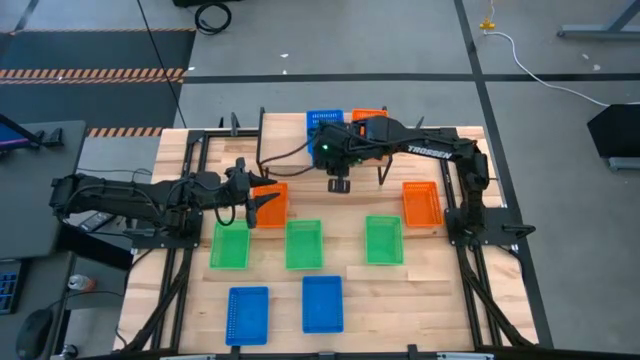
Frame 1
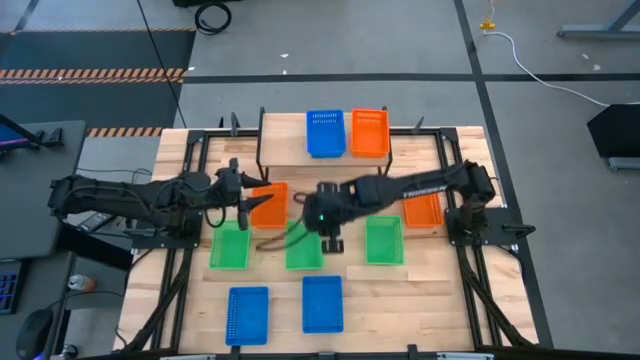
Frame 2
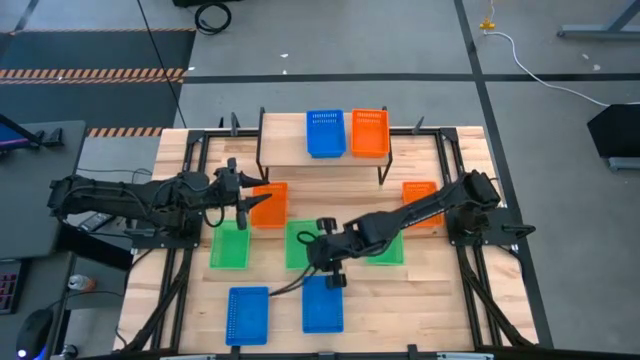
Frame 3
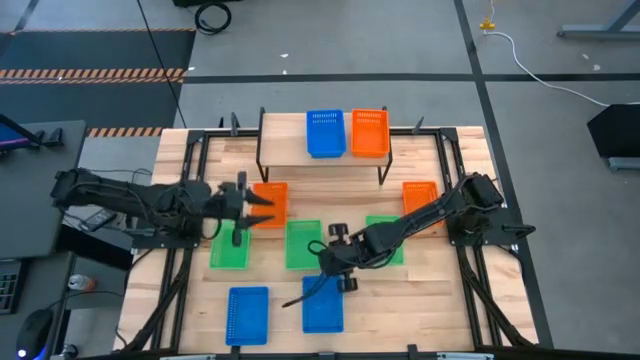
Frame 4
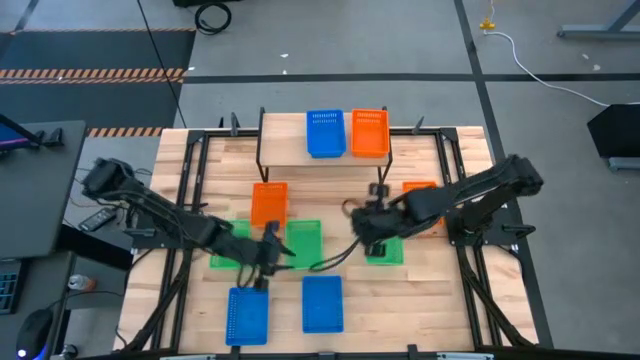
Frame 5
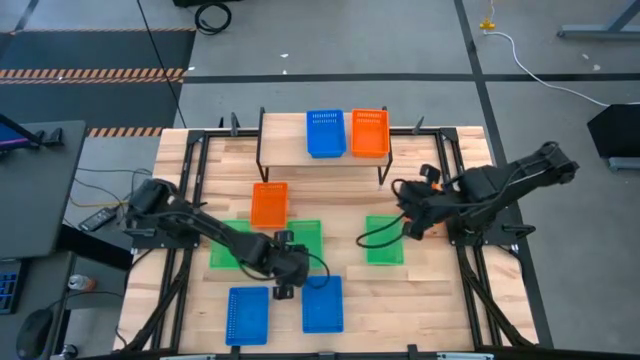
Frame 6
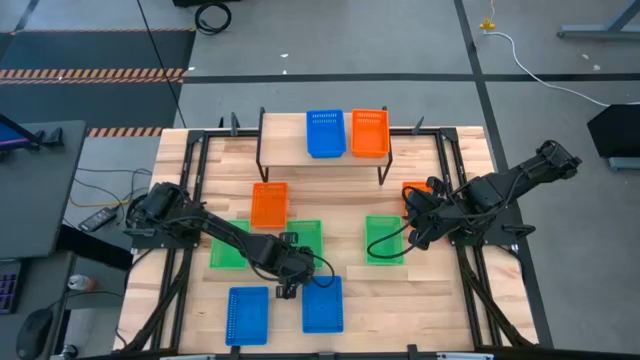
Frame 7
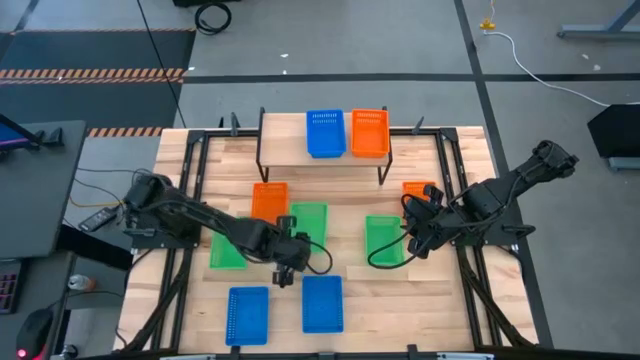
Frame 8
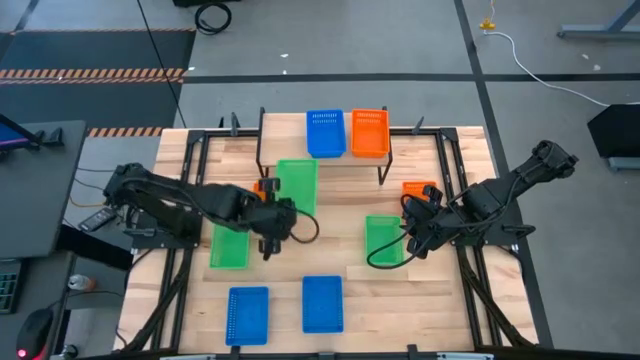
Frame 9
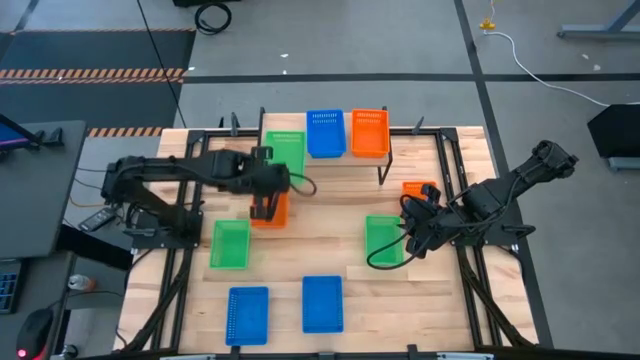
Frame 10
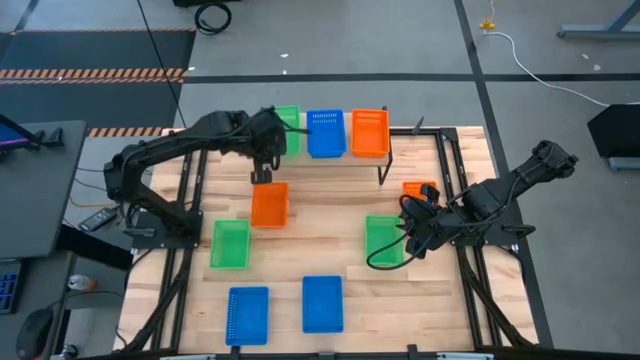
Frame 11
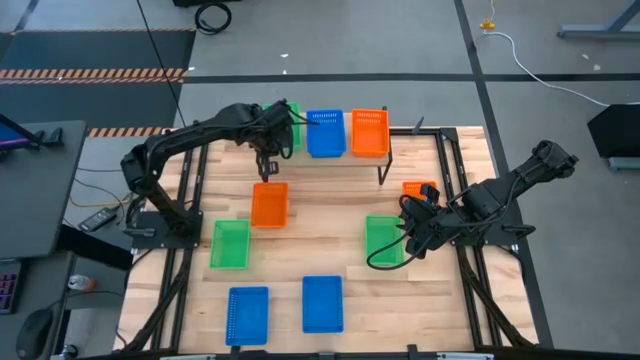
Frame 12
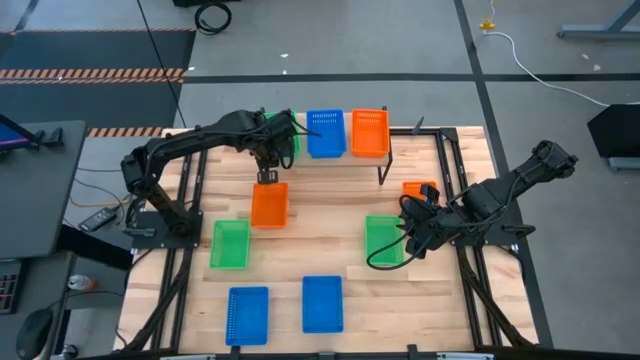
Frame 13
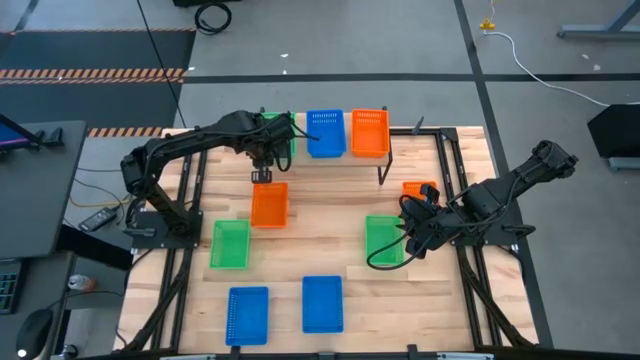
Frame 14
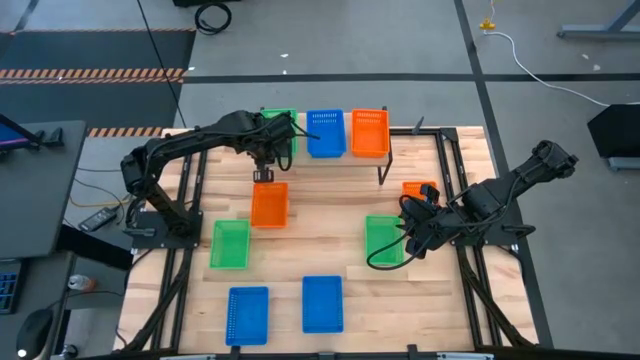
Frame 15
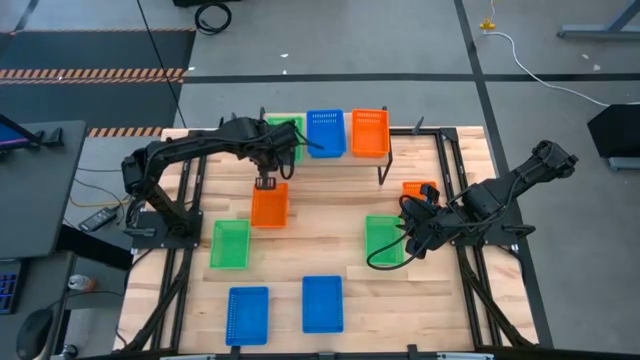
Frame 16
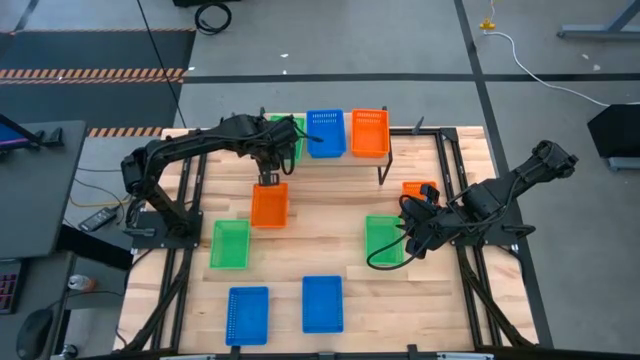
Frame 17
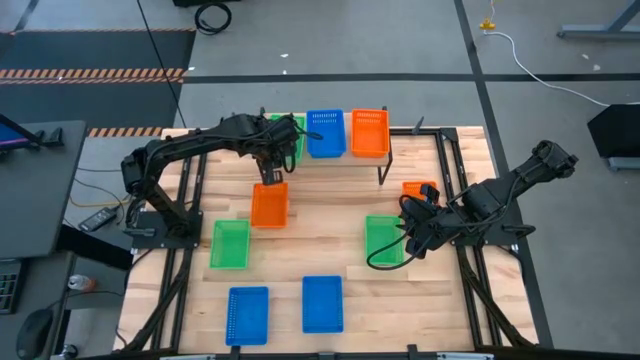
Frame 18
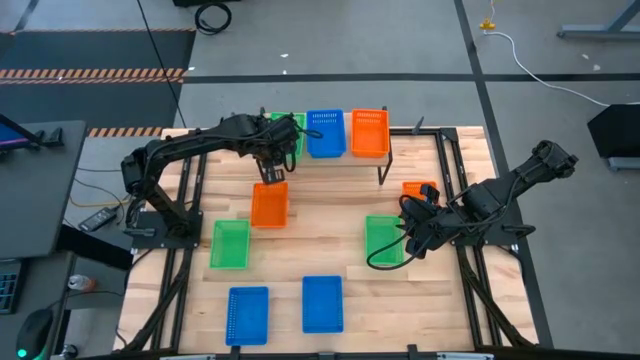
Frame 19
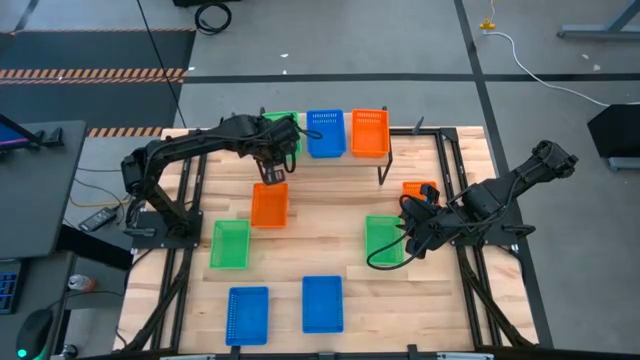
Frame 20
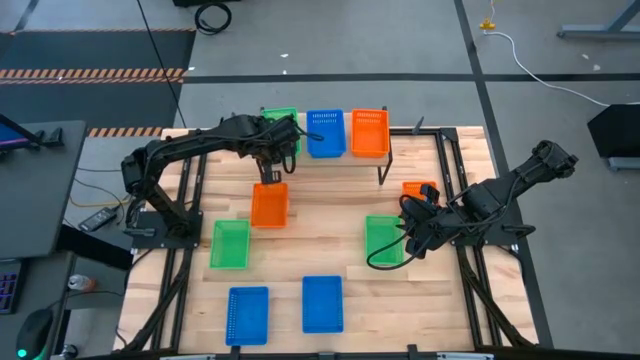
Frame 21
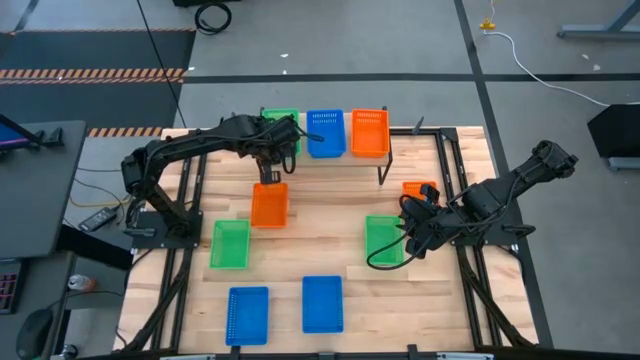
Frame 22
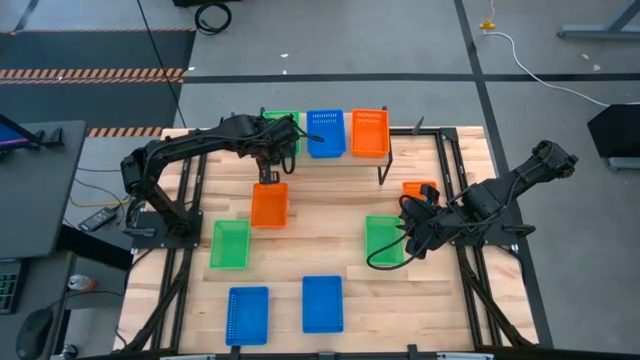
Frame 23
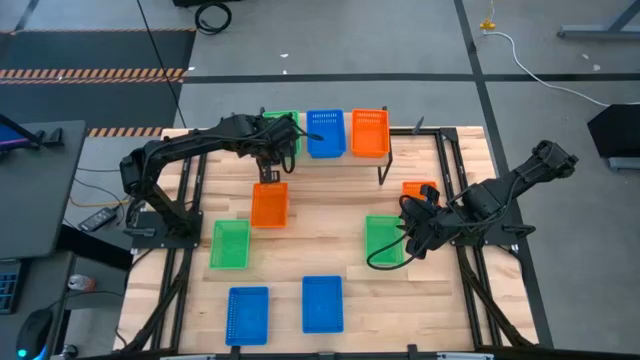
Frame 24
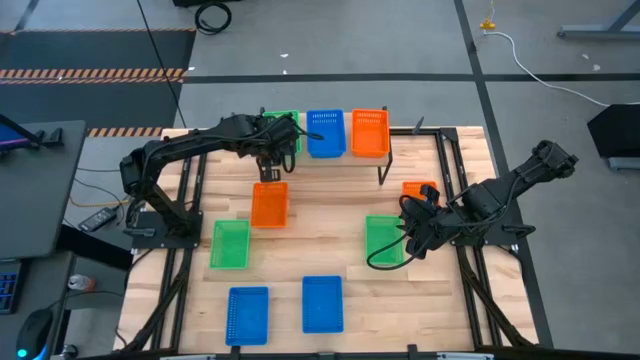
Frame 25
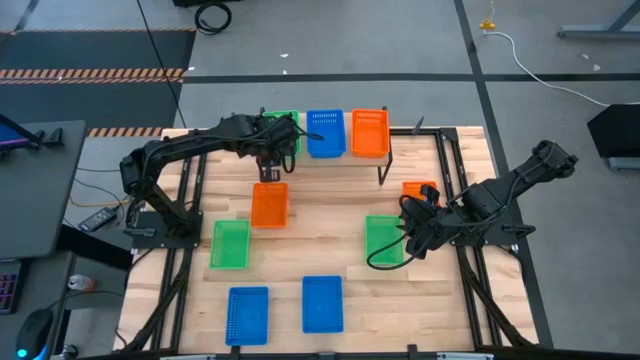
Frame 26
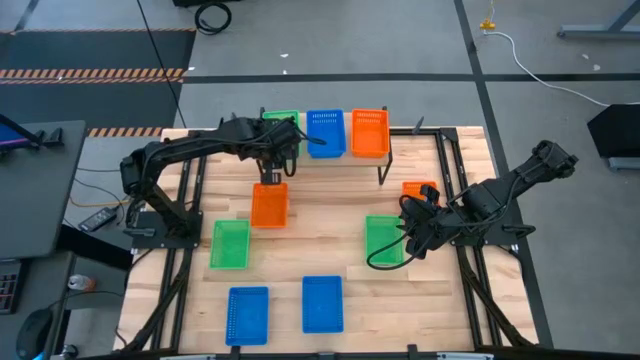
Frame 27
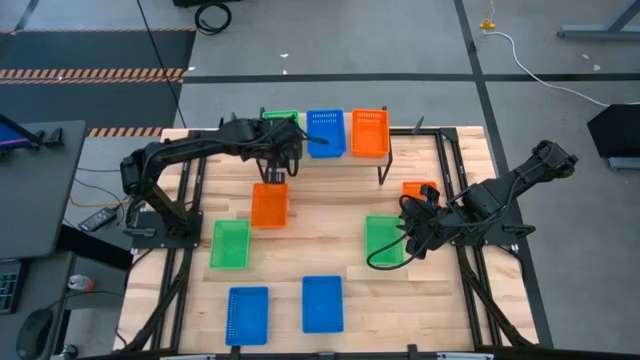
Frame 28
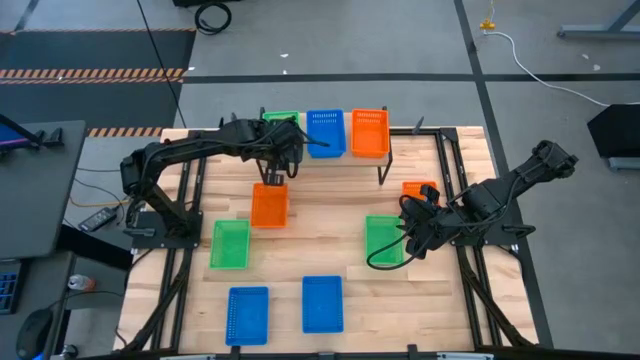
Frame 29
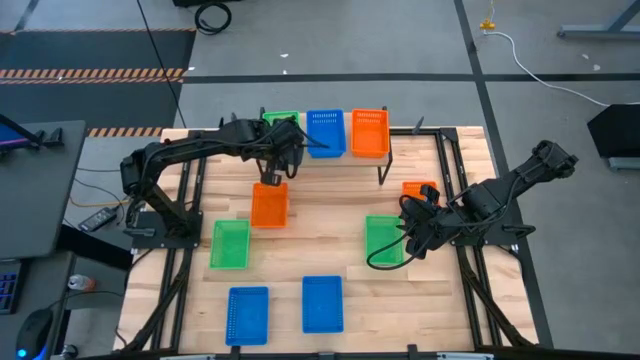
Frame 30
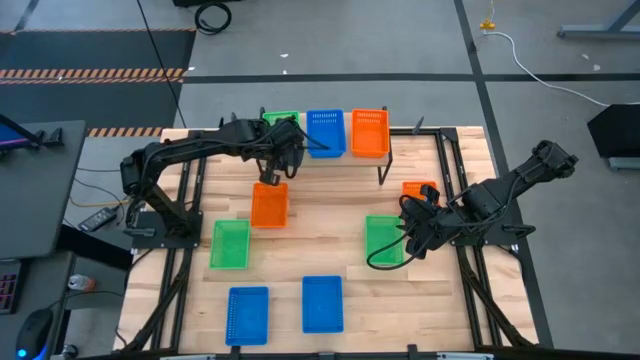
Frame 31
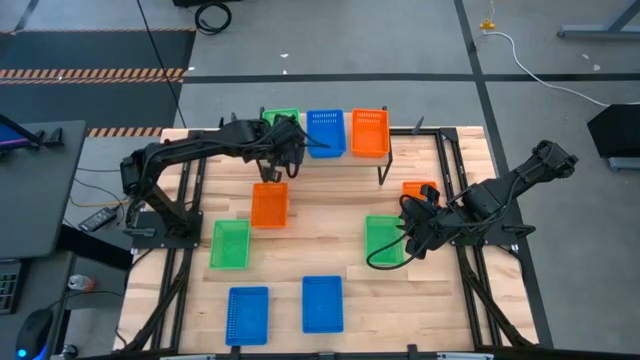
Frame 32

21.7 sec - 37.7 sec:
Task: Stack baskets on shelf by color
Put the middle green bin on the shelf

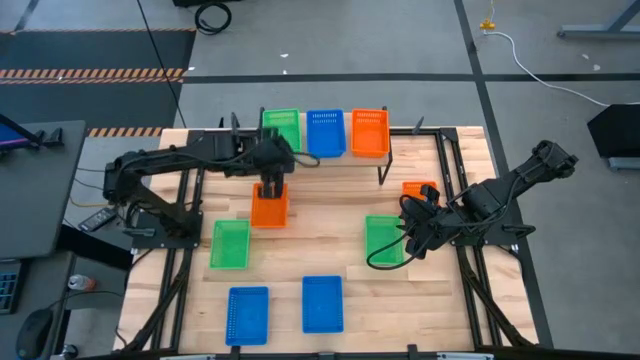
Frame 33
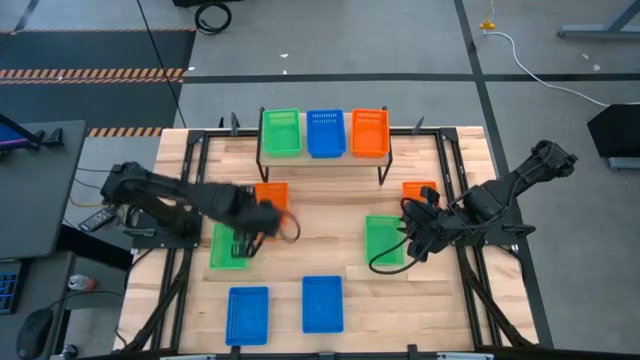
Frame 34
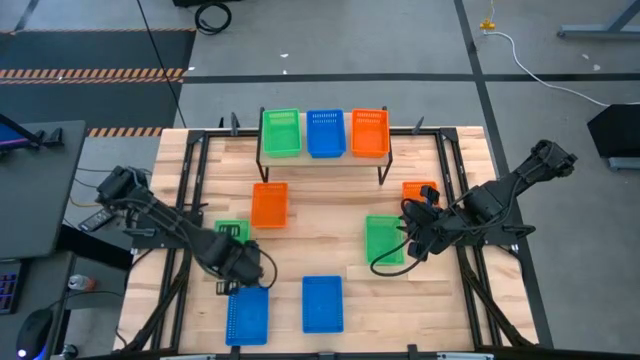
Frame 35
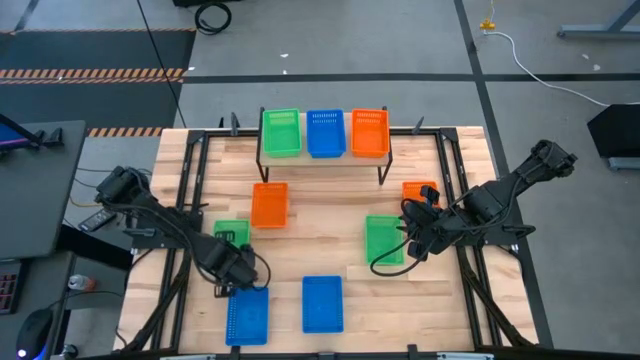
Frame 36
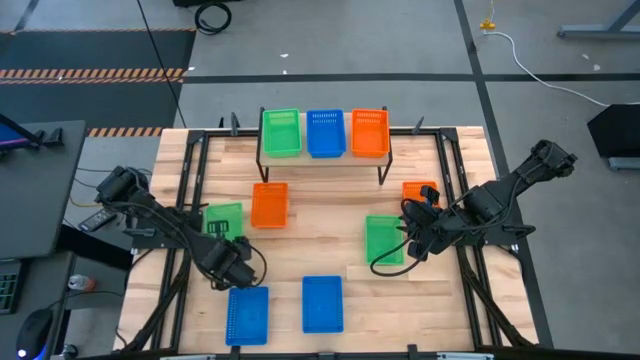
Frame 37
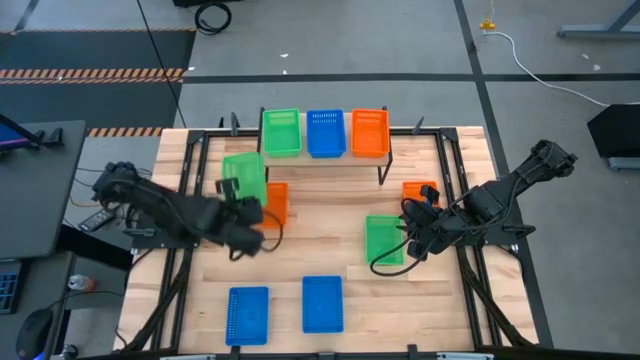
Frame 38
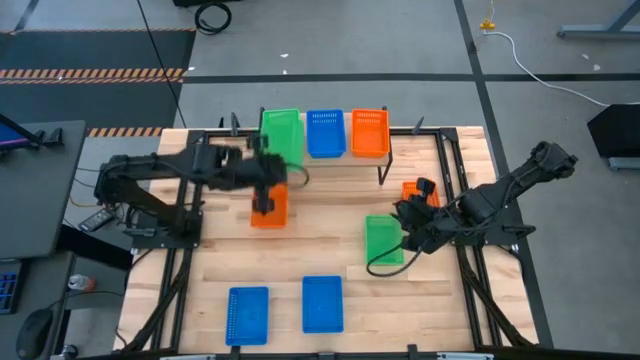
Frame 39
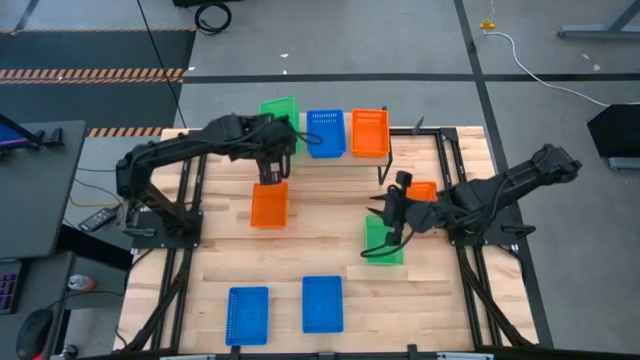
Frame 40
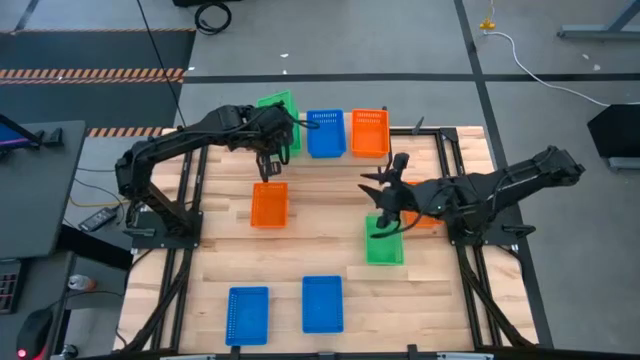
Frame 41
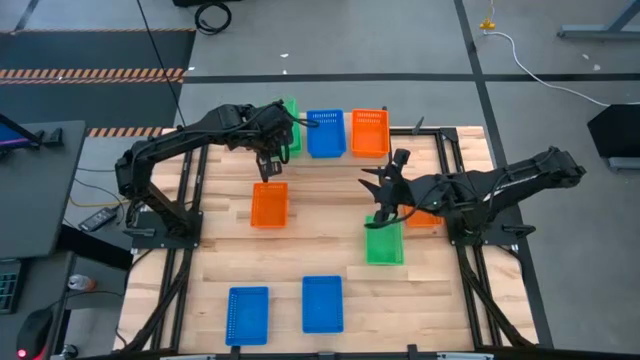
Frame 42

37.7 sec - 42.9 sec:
Stack the left green bin on the green bin on the shelf

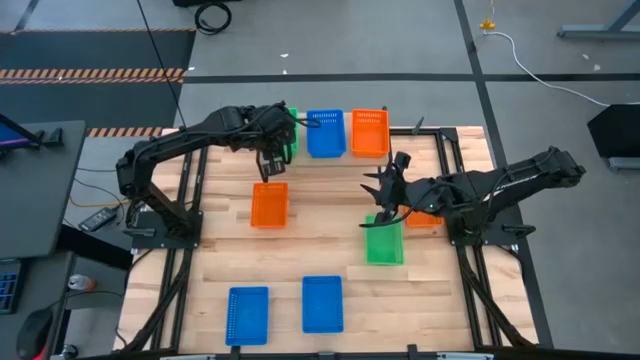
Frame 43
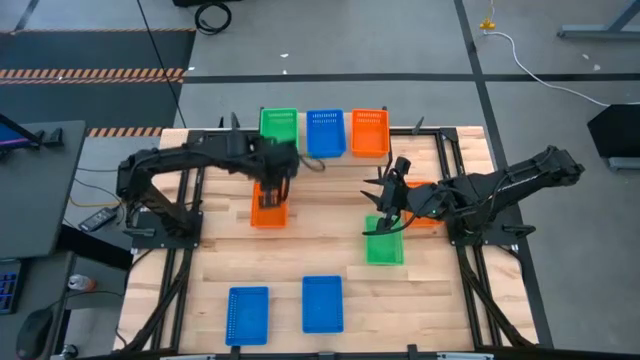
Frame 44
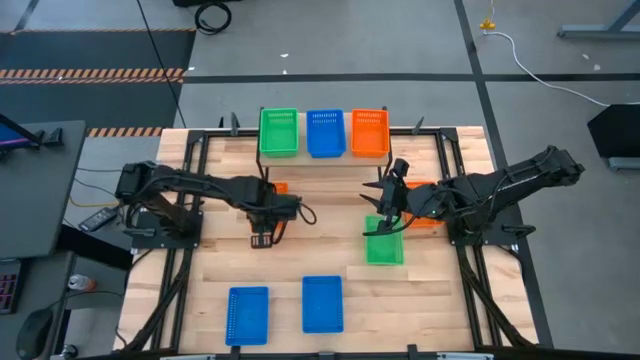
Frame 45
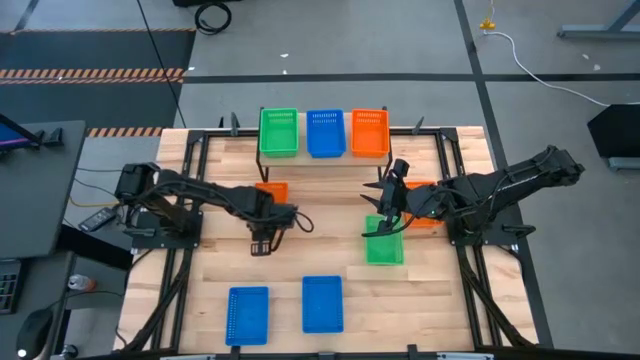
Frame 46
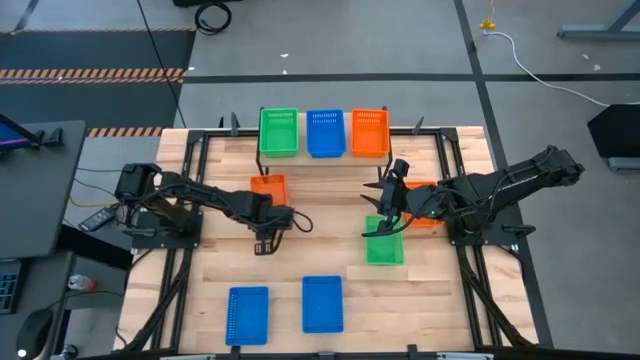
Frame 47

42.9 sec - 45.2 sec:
Stack the left orange bin on the orange bin on the shelf
